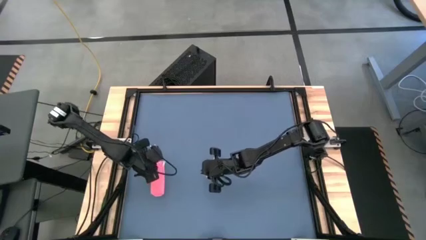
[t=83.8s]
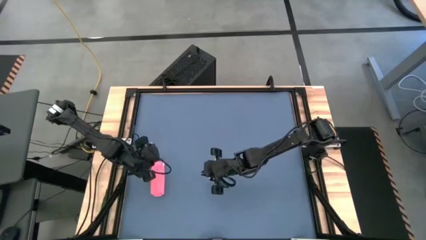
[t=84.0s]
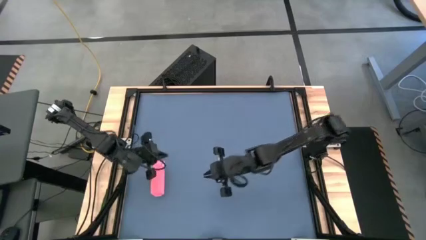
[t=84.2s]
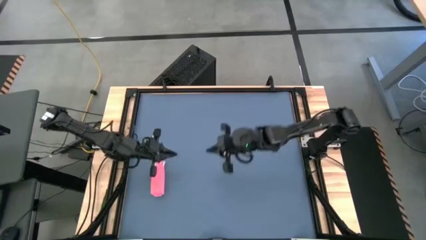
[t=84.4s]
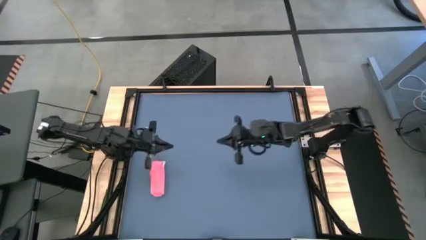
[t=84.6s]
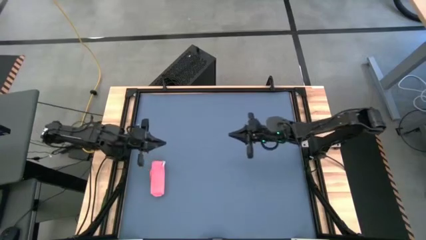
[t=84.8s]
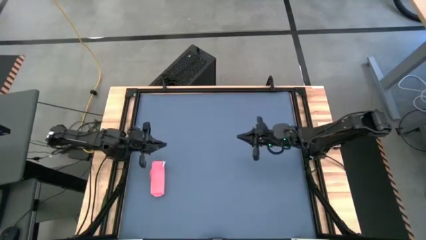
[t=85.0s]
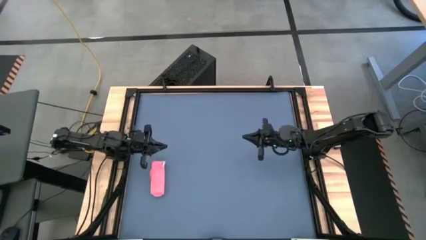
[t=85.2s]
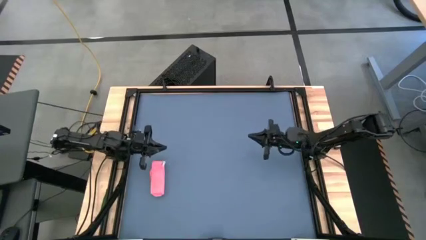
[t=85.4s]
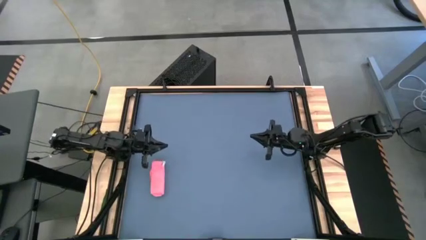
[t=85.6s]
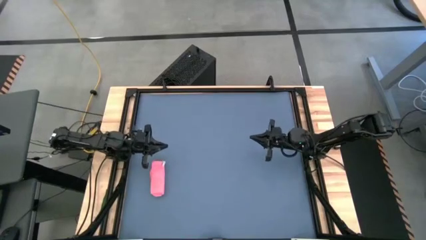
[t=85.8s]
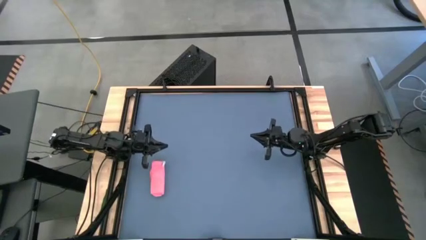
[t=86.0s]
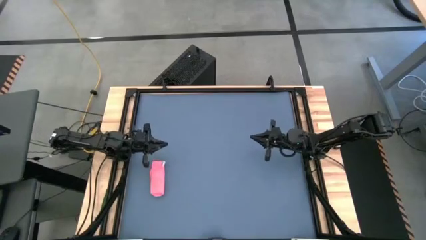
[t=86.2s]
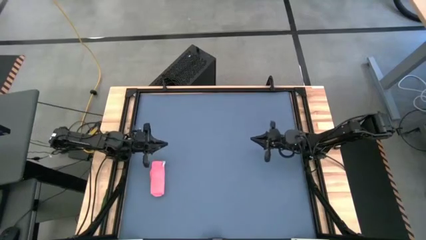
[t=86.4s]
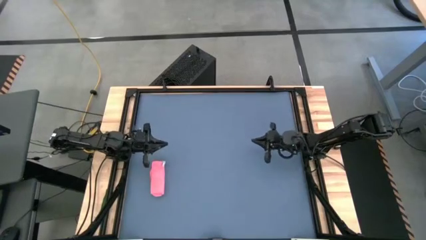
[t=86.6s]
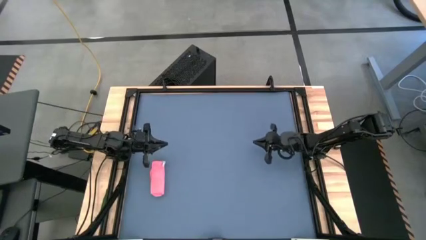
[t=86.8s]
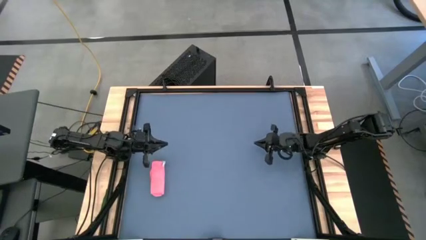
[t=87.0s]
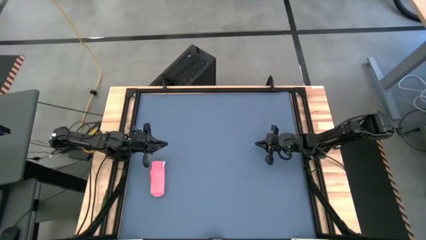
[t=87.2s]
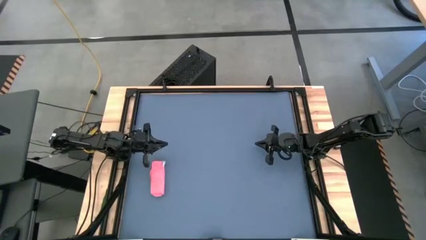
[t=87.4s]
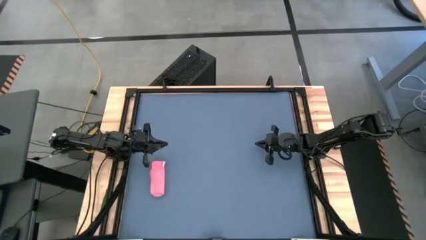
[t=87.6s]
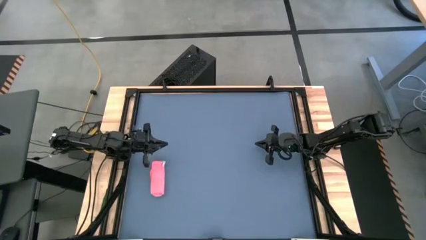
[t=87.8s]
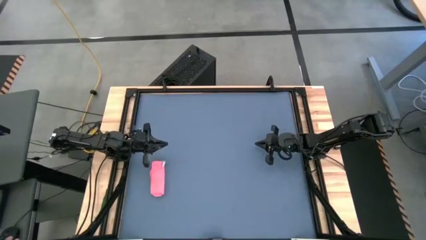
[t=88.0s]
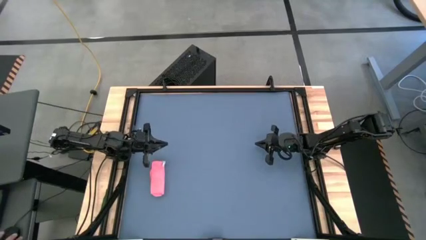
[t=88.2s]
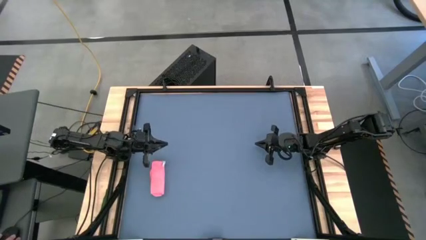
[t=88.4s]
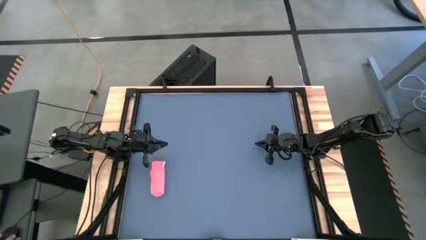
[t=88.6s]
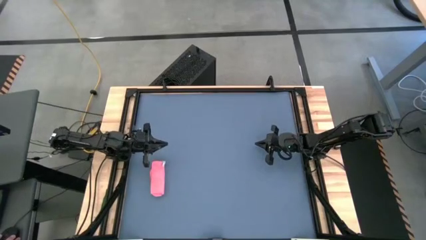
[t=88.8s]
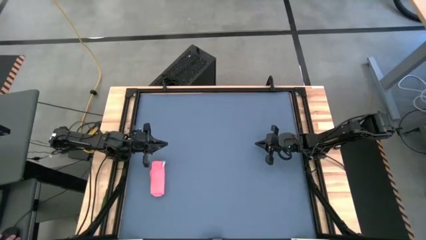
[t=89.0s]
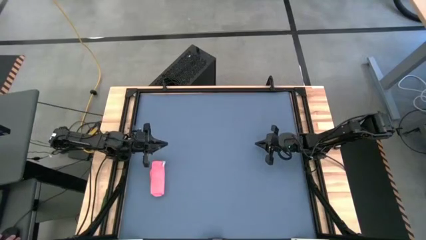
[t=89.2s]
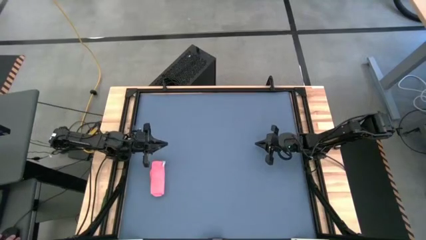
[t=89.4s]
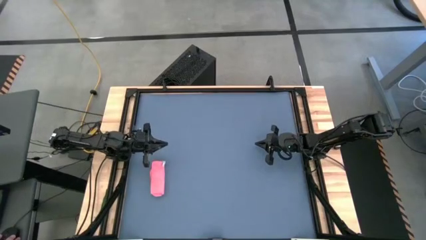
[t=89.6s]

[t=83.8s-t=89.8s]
Task: Roll towel into tight, uniform cylinder
Return to Home Position

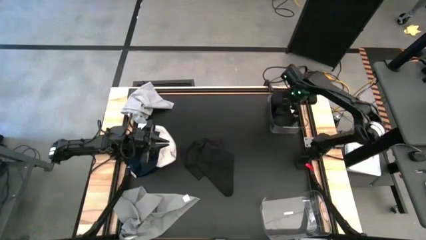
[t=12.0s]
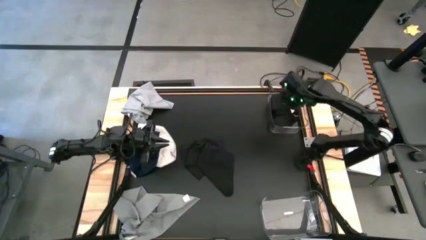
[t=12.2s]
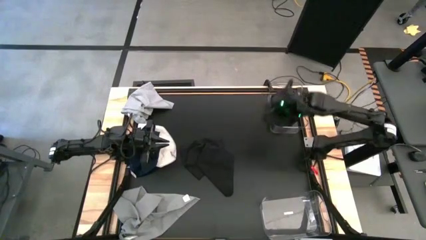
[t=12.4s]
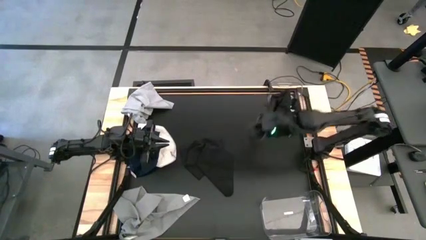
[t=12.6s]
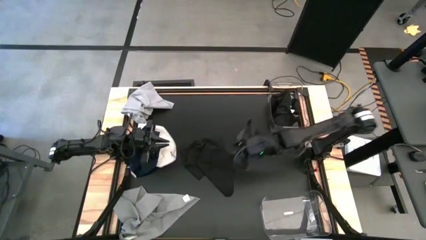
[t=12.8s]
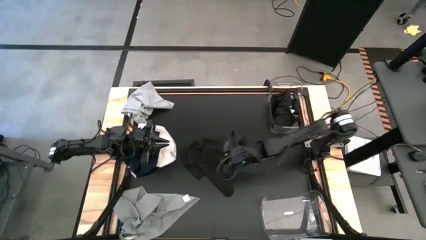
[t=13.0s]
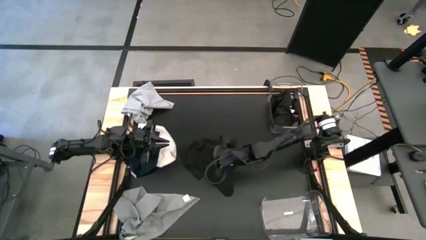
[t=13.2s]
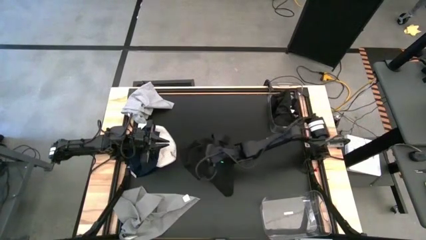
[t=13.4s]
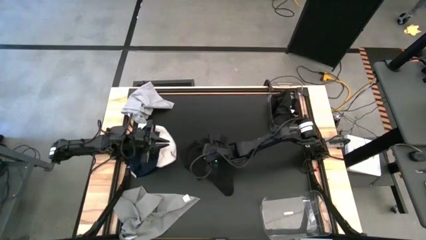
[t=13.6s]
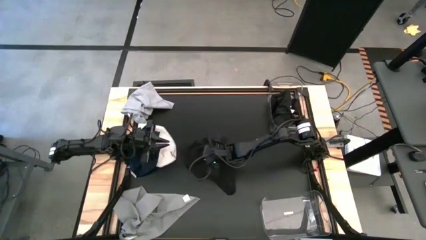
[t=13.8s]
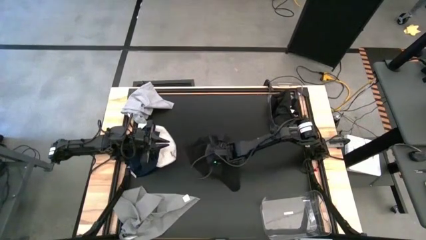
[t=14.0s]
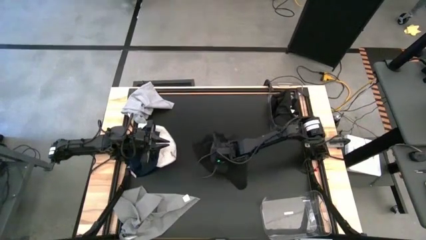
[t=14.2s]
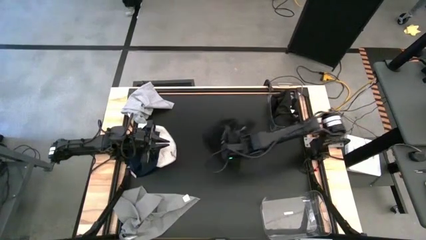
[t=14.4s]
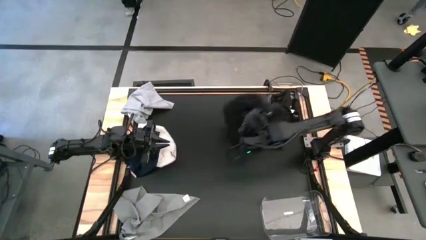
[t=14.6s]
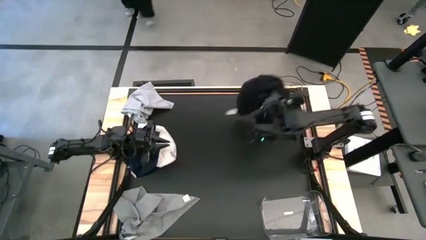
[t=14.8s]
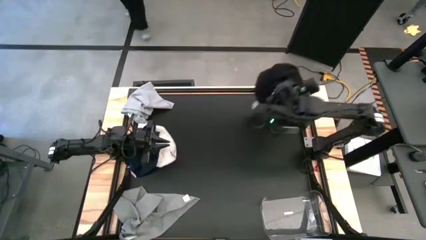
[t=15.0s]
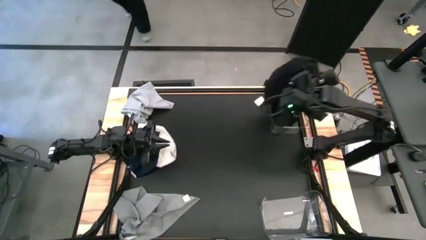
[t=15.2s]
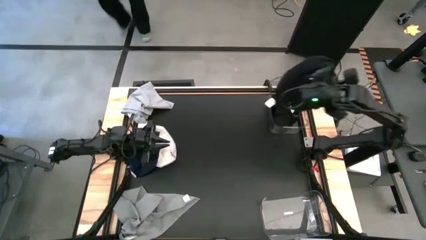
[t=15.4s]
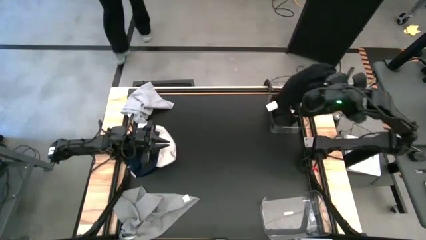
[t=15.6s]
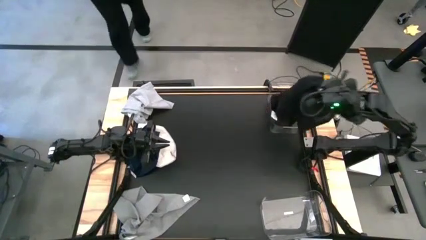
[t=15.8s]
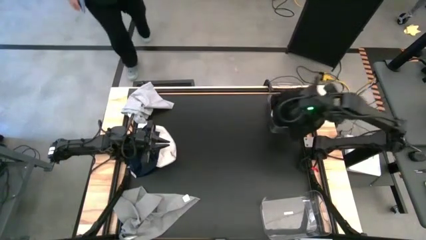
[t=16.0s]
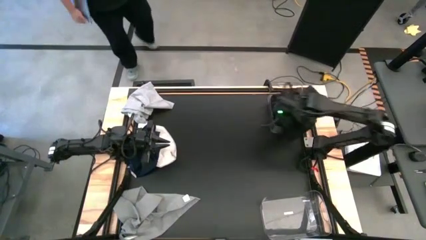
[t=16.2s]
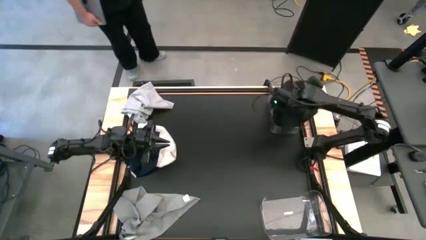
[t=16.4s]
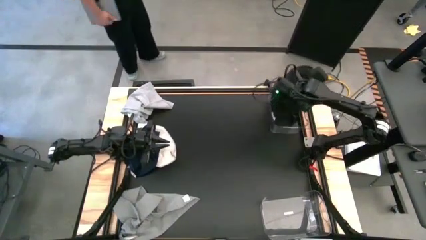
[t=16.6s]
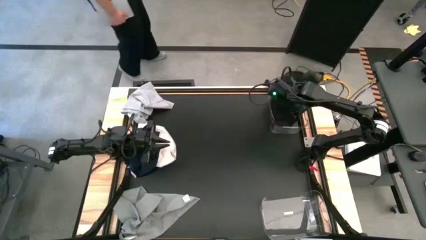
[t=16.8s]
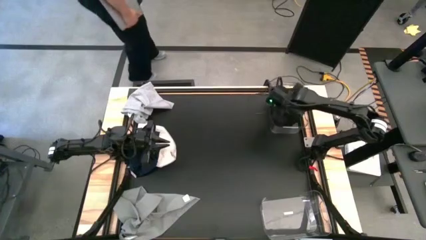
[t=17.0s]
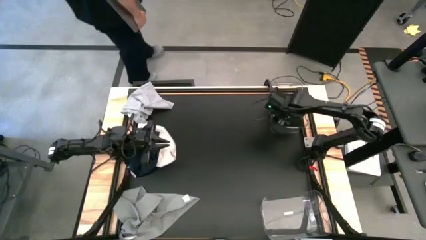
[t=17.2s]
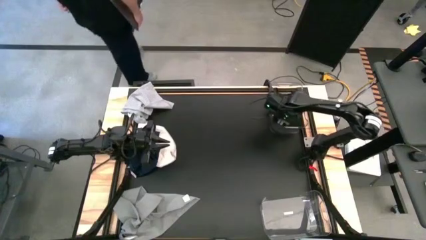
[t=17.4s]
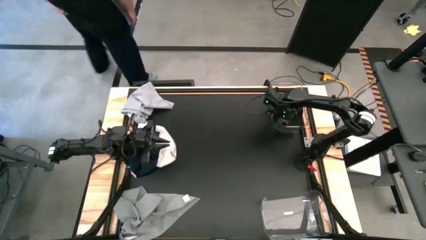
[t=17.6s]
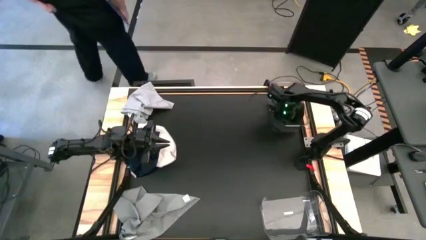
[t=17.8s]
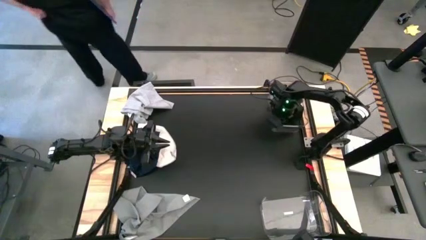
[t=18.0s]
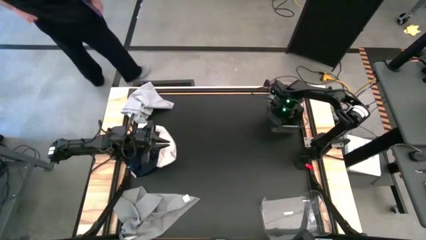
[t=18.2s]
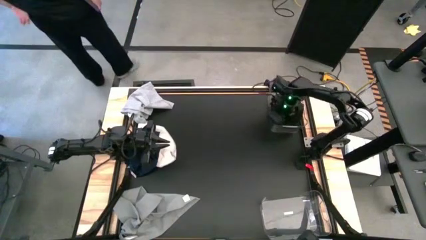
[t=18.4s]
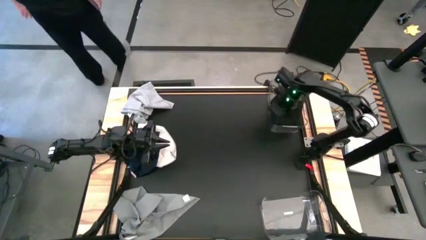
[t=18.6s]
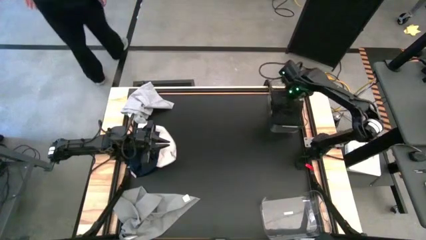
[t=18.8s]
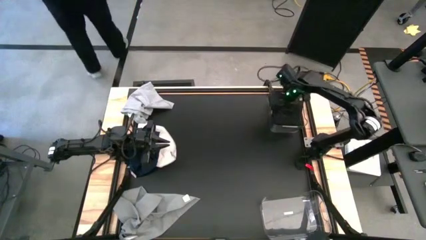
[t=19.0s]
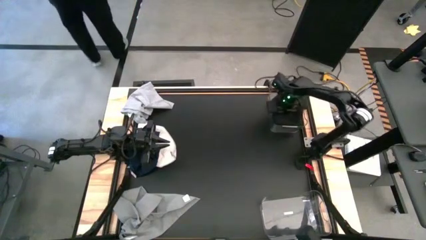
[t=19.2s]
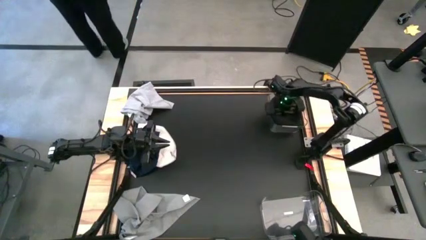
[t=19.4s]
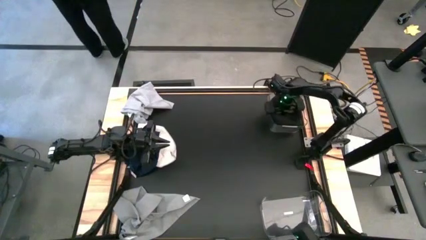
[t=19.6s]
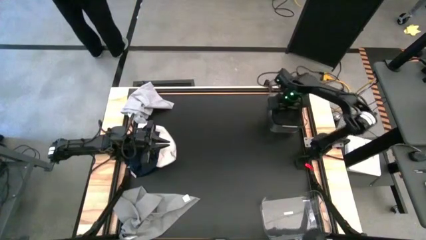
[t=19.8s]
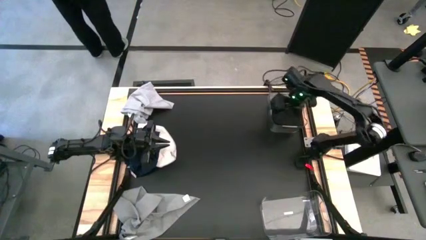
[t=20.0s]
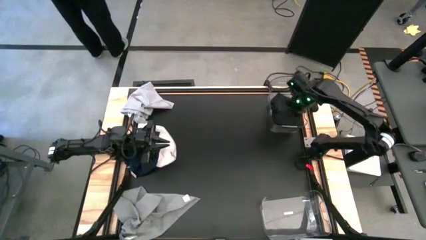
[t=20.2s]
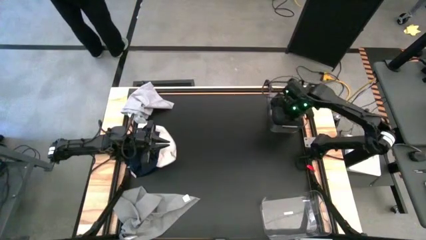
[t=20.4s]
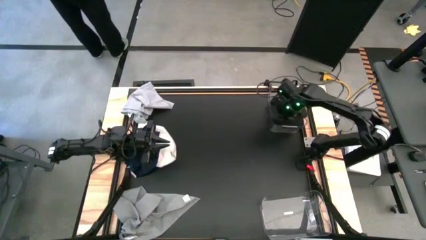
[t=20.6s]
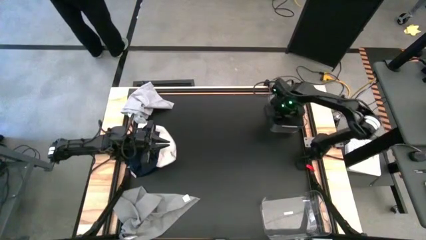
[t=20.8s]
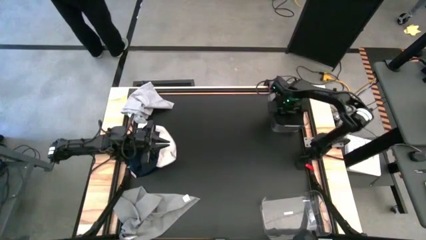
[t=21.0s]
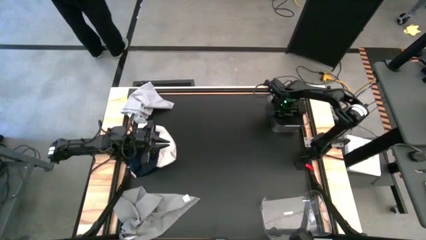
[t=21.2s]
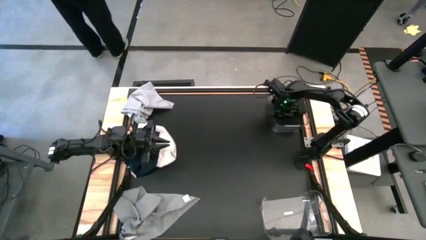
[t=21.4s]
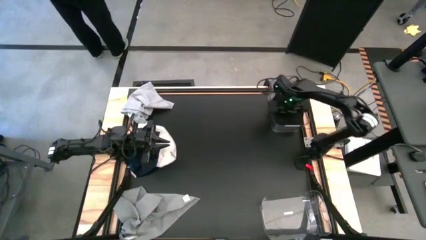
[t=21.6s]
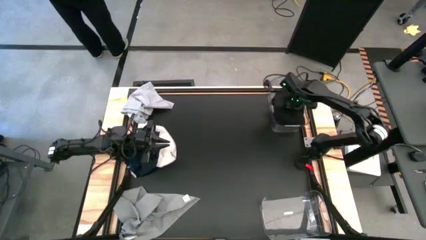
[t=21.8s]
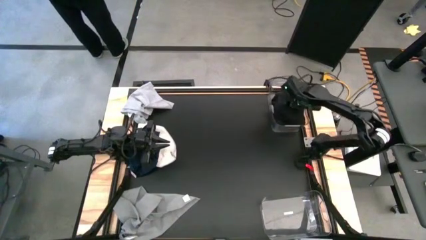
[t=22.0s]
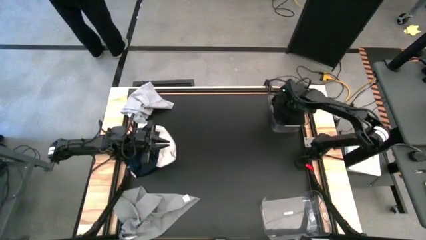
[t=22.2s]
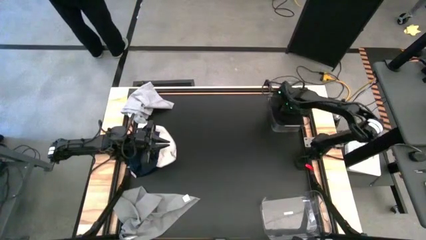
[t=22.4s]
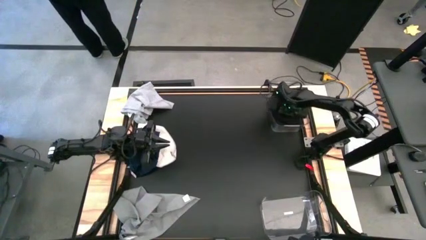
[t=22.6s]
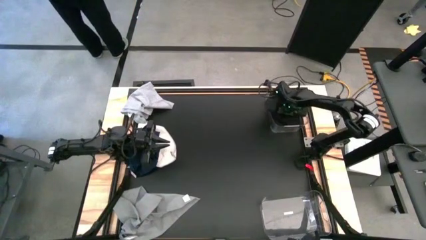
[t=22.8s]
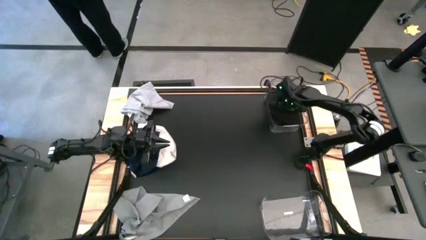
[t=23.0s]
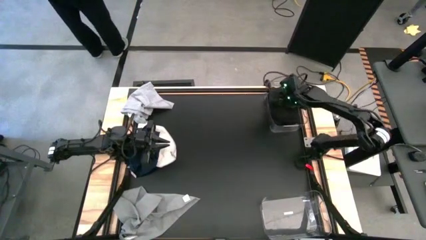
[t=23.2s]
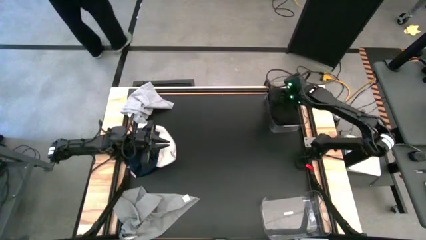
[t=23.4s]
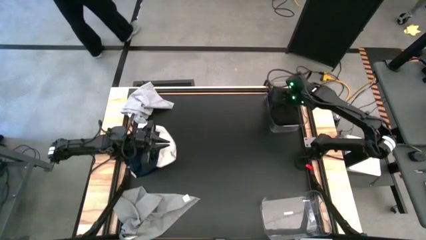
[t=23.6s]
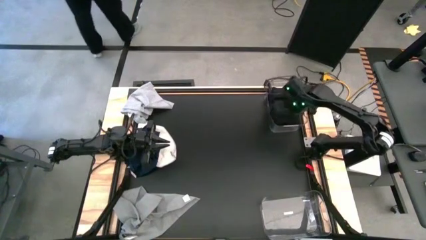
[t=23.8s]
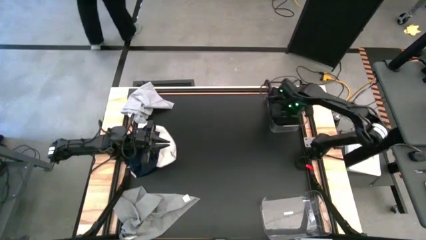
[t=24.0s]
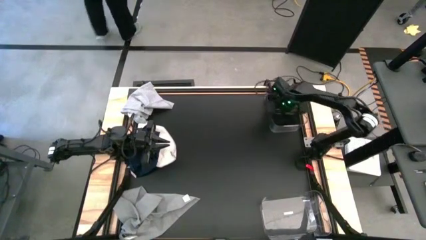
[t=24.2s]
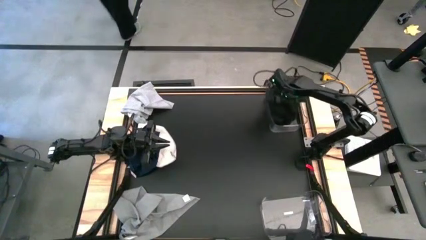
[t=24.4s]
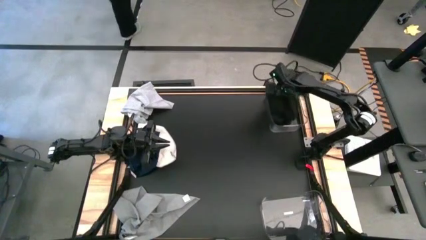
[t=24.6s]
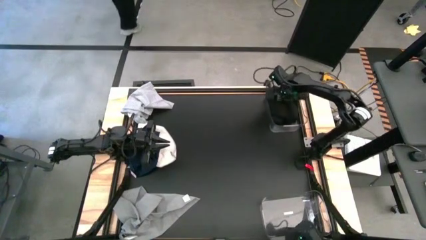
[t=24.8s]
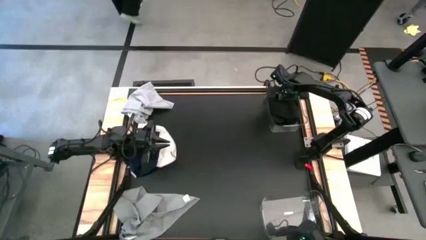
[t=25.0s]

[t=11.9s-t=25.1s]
Task: Sort towels by color in basket
Put the black towel into the top transparent bin
